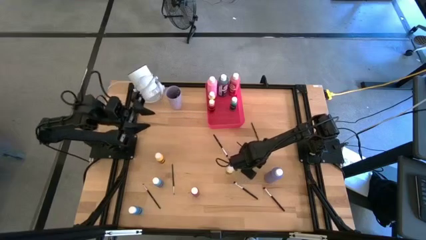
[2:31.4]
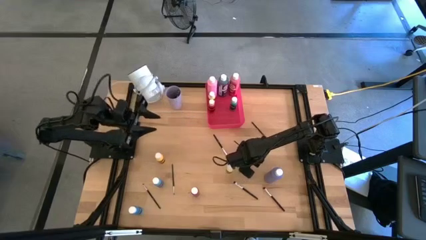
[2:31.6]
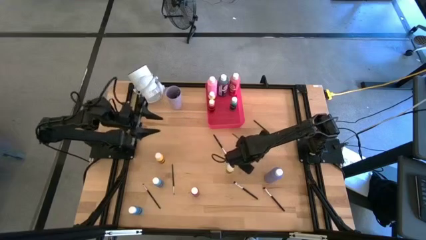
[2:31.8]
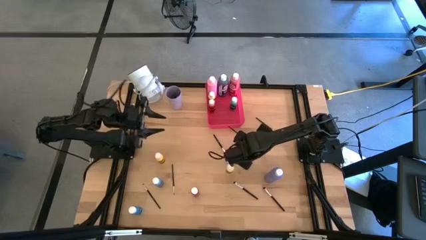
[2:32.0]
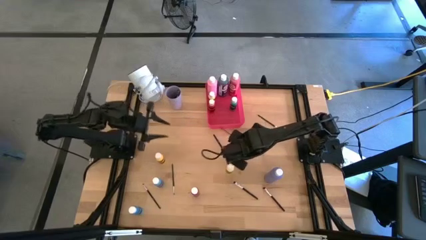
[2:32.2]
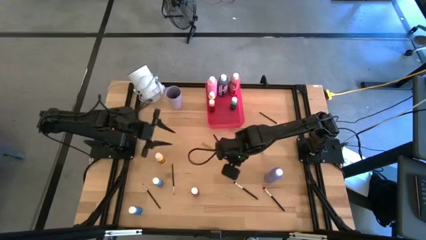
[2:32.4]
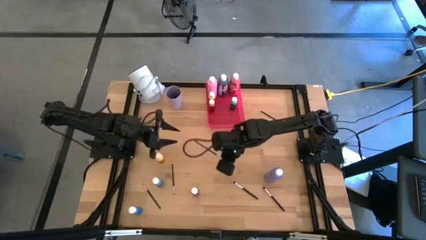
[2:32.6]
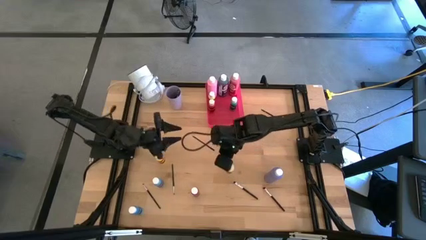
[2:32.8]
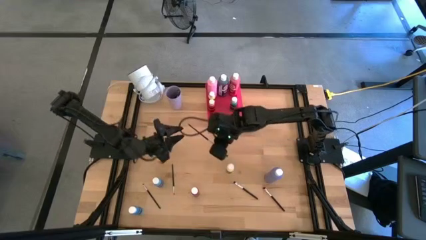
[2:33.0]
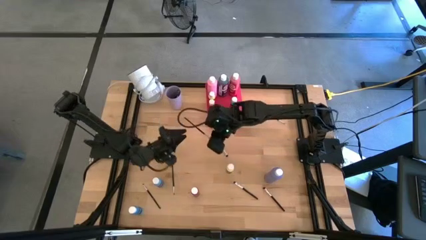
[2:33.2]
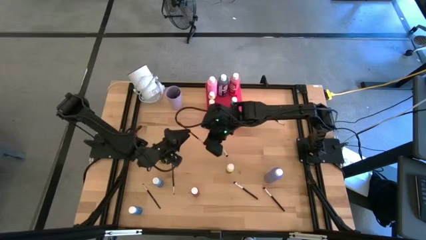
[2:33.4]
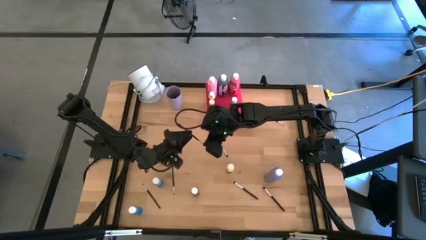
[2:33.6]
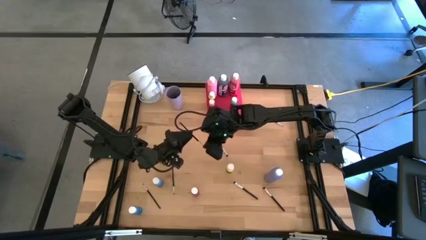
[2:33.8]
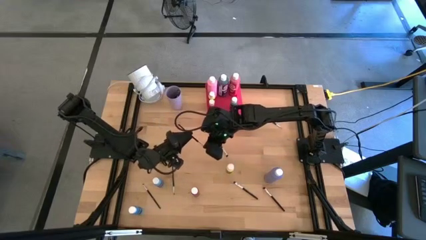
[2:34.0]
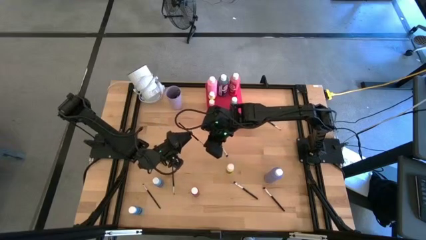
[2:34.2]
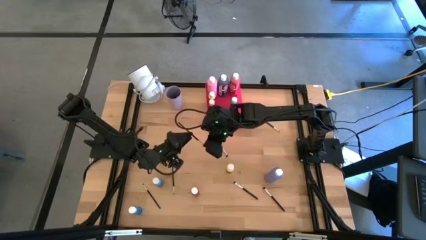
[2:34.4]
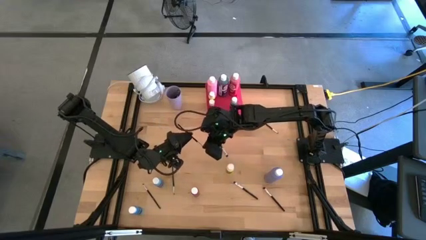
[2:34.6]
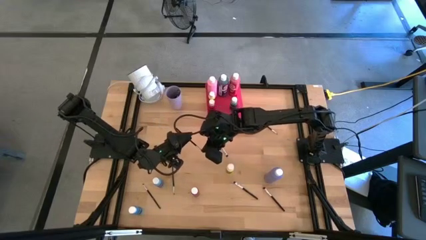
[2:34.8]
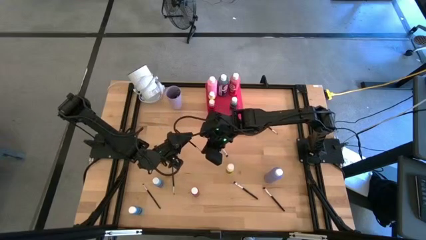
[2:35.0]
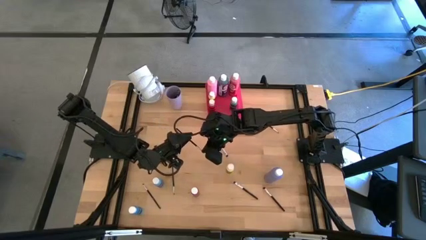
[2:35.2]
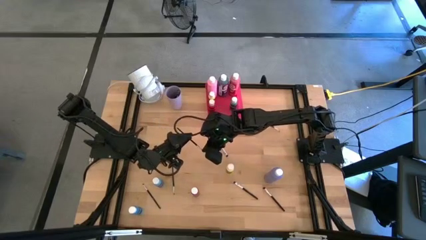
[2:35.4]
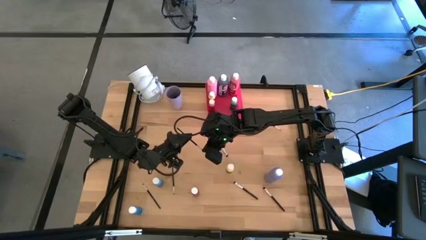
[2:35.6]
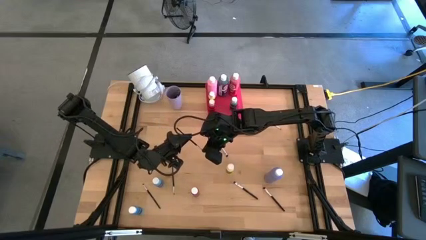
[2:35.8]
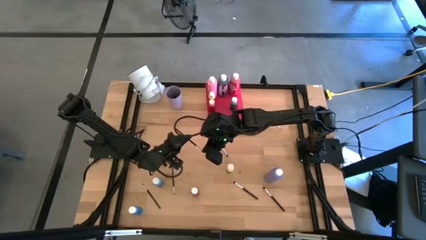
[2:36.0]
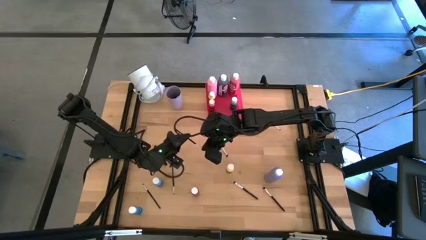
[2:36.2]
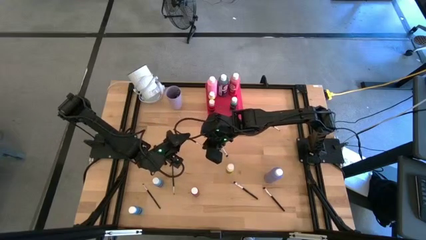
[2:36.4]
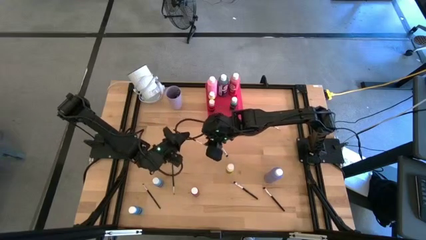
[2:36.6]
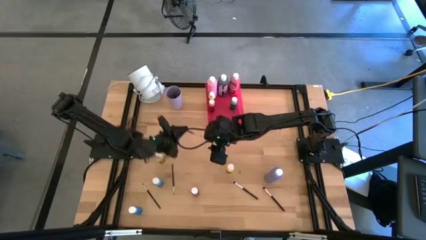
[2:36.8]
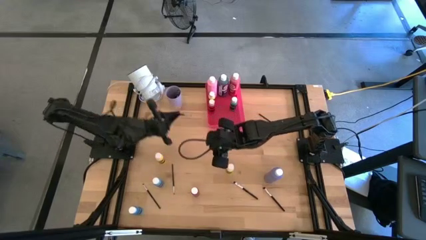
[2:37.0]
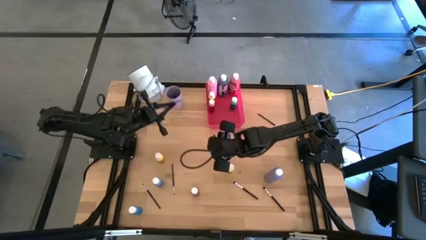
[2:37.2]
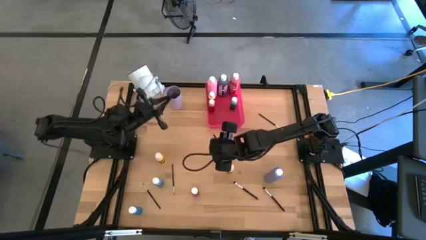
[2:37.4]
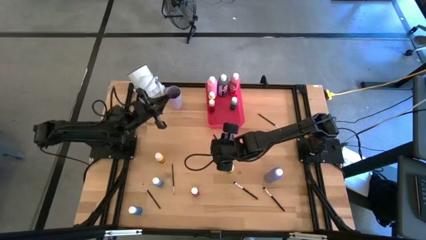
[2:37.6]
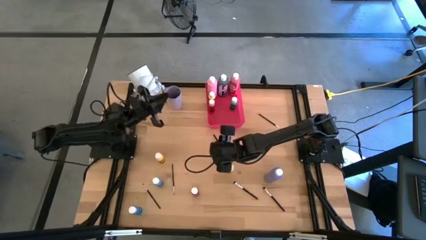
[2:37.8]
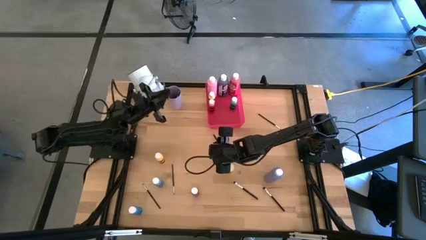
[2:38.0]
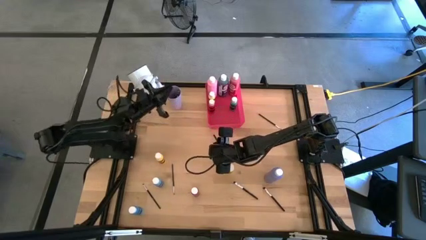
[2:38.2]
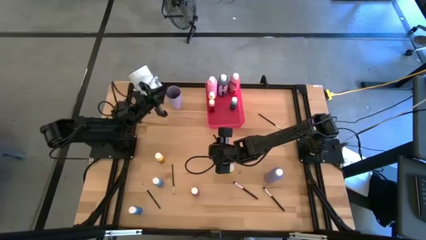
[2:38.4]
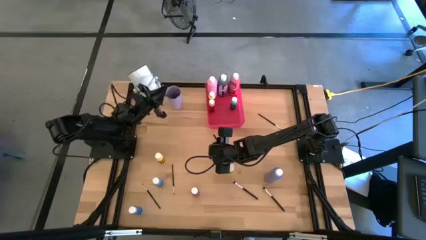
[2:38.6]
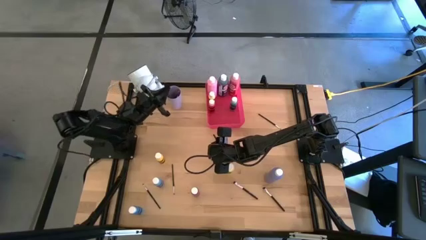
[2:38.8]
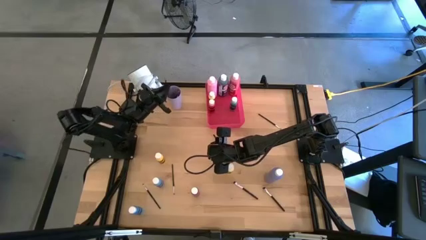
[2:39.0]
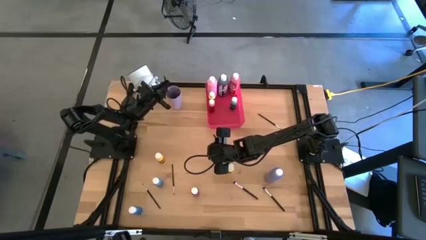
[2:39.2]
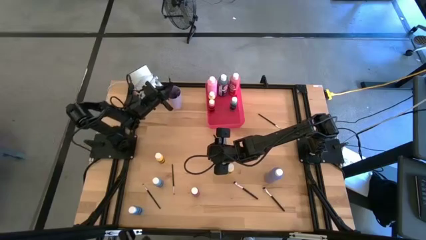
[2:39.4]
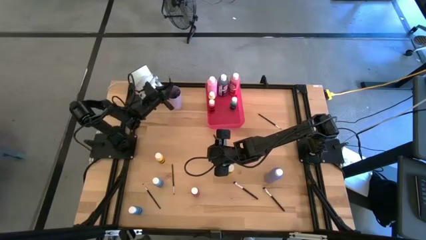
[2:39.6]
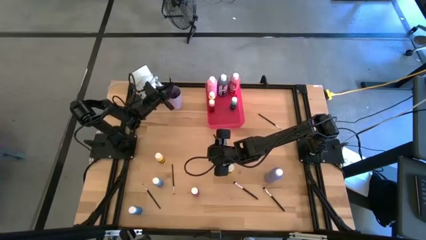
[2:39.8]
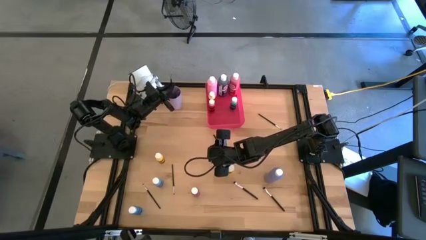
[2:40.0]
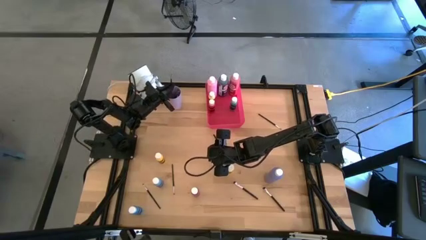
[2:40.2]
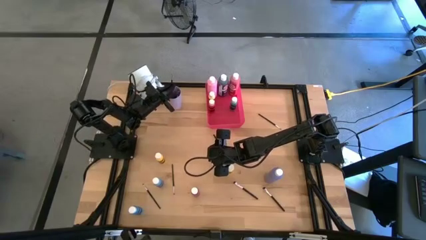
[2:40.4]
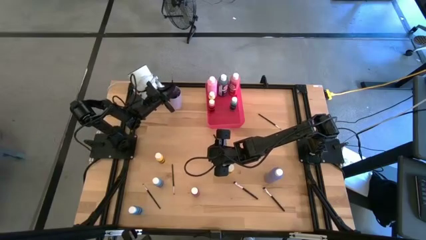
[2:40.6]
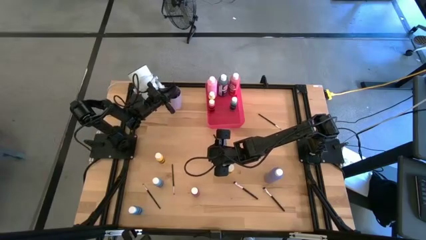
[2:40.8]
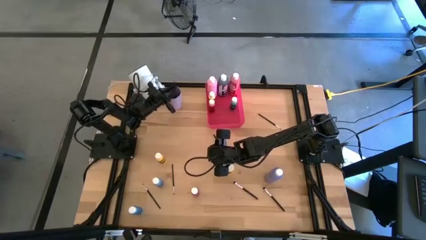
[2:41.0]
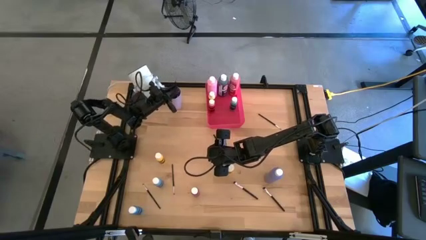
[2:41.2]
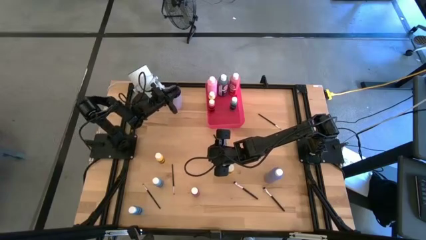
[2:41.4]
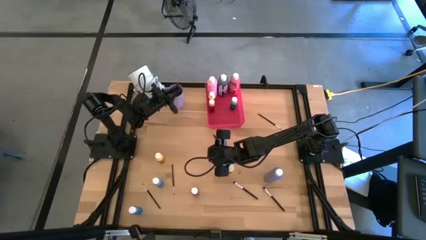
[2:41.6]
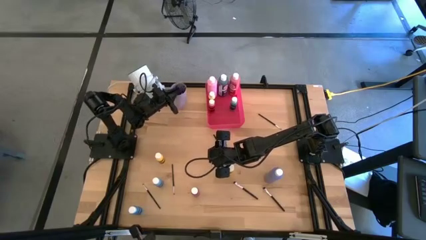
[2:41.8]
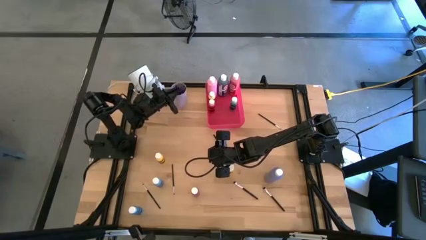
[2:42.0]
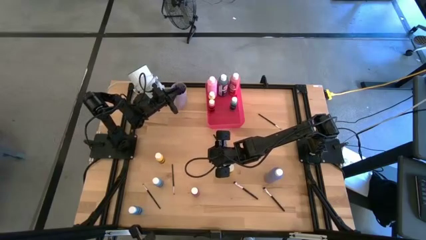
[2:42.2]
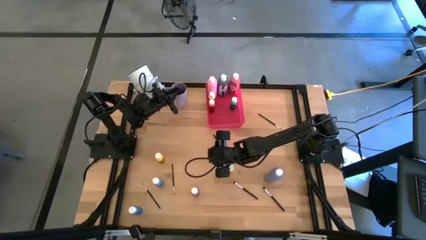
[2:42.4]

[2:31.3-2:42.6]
Task: Pick & Place Paint Supplies
Put the black paint brush into the purple cup

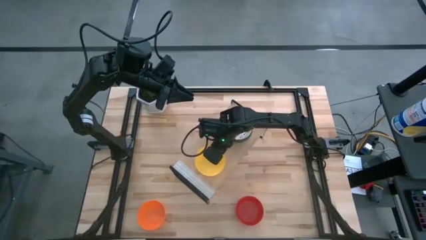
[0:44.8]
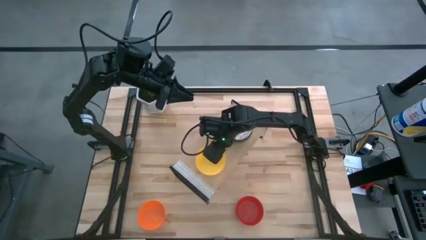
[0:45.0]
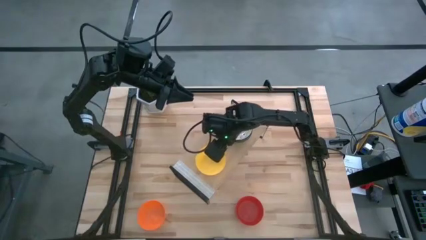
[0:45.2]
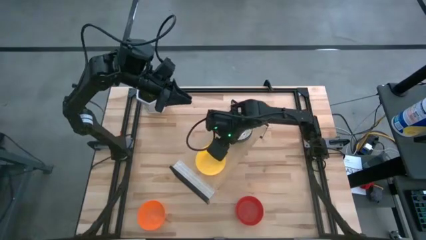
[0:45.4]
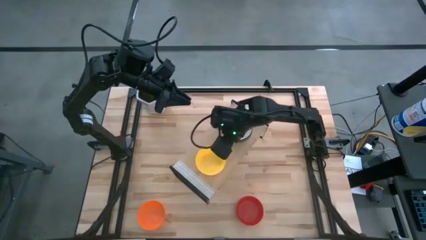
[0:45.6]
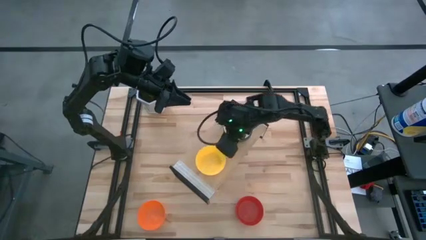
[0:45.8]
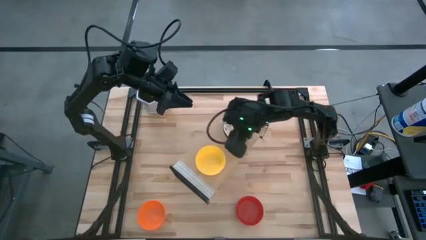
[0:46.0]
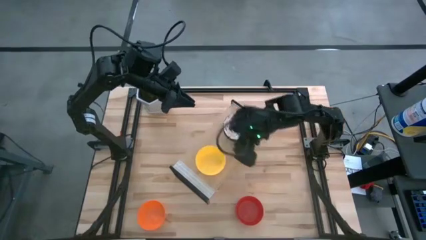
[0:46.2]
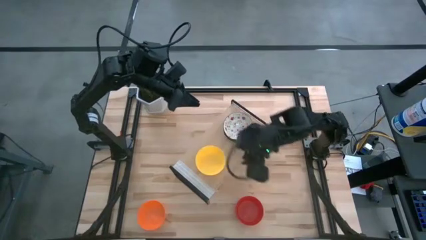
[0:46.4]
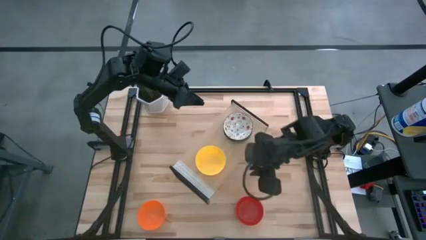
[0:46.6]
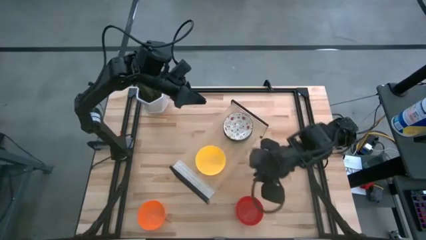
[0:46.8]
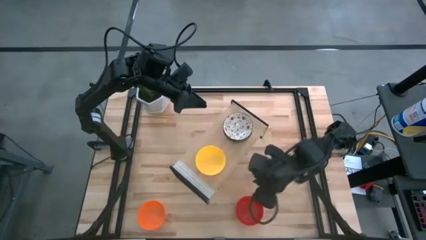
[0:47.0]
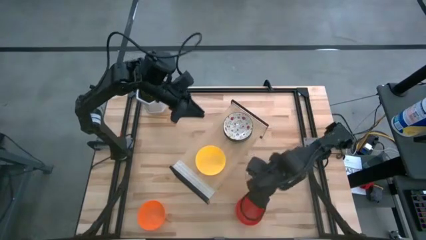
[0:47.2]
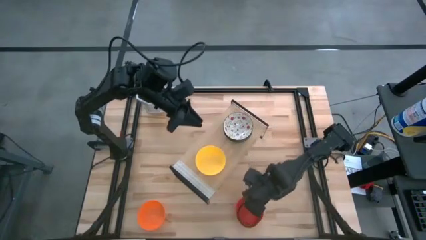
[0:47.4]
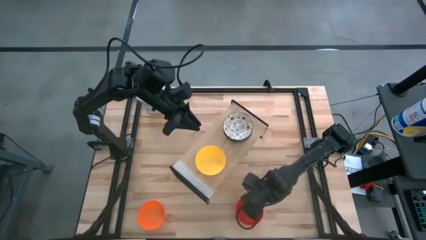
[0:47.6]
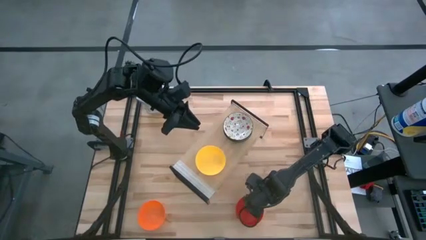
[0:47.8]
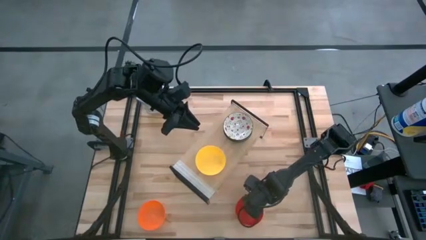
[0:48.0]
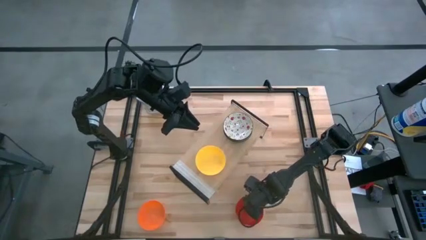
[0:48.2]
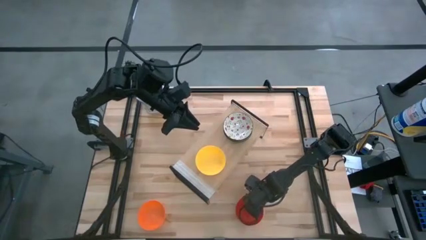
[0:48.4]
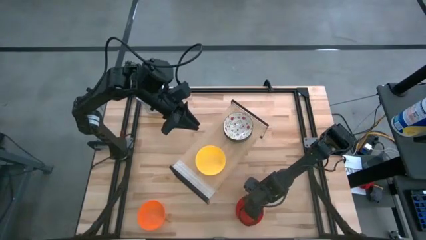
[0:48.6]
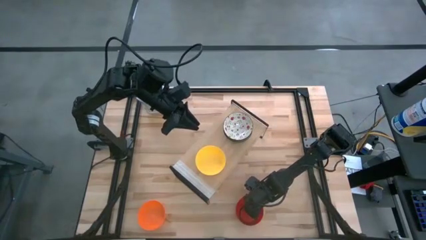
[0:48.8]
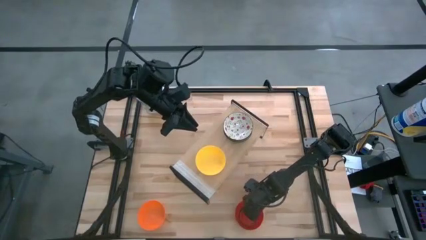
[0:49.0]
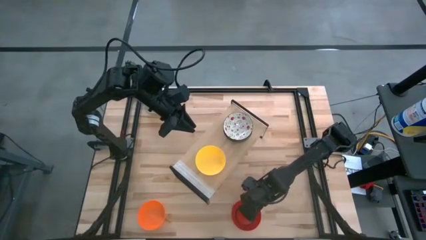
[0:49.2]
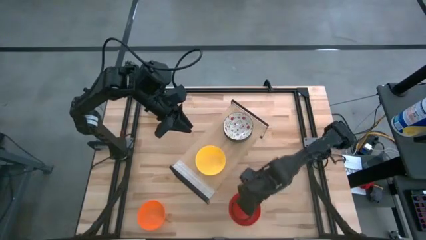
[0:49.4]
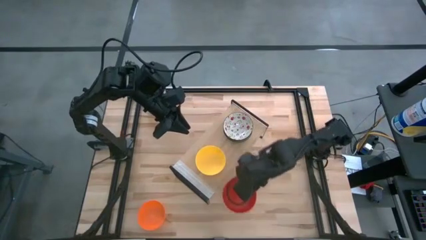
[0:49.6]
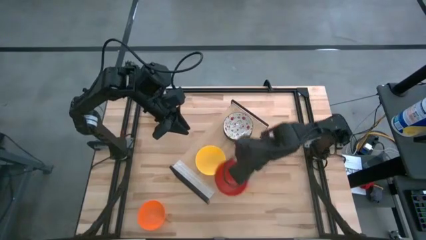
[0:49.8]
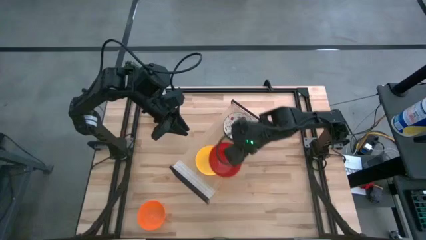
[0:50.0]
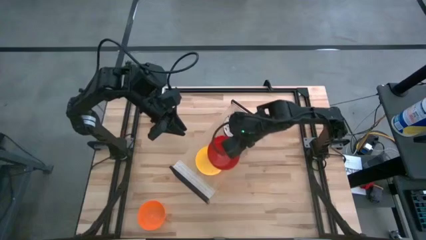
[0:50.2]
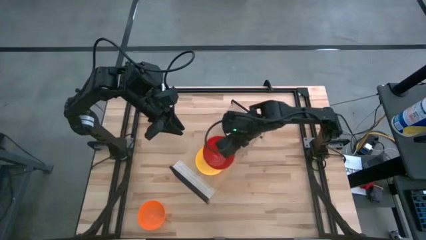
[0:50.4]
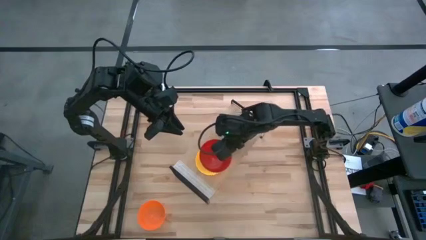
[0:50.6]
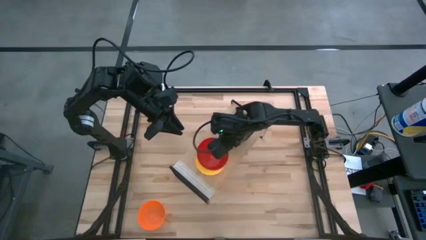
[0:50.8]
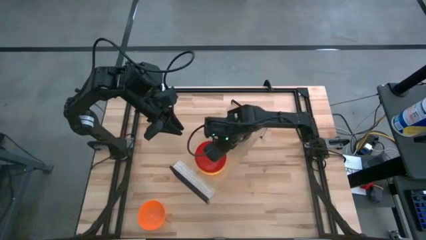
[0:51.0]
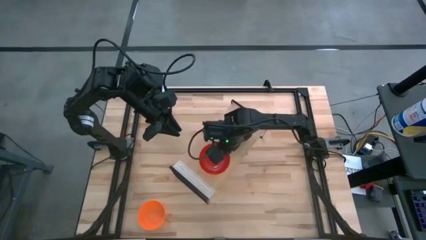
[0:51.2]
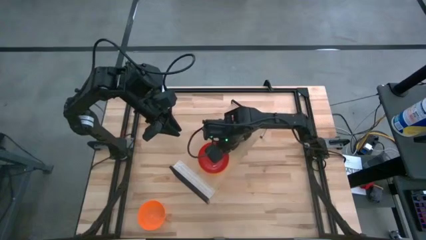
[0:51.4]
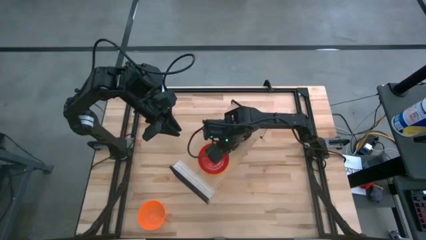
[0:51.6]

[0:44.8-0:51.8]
Task: Pick & Place Mini bowls
Stack the red bowl on the yellow bowl on the shelf
